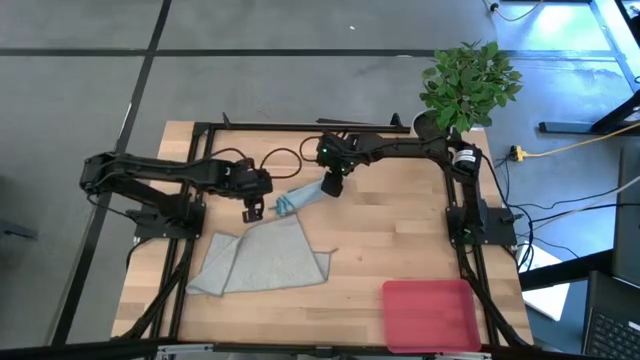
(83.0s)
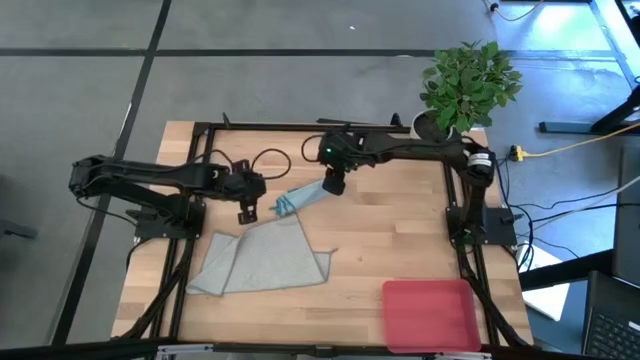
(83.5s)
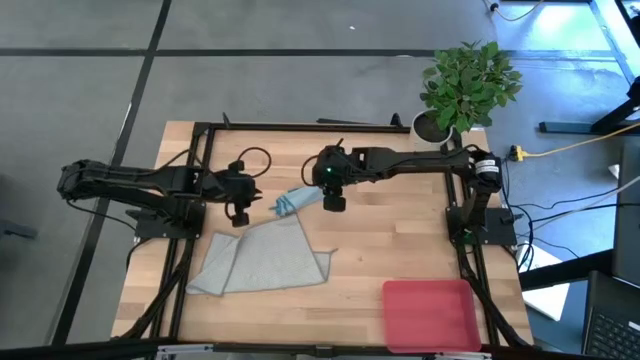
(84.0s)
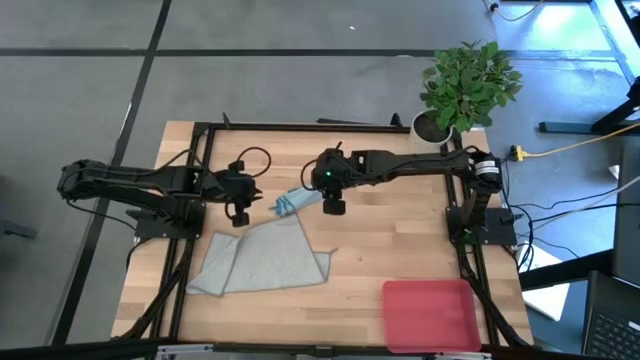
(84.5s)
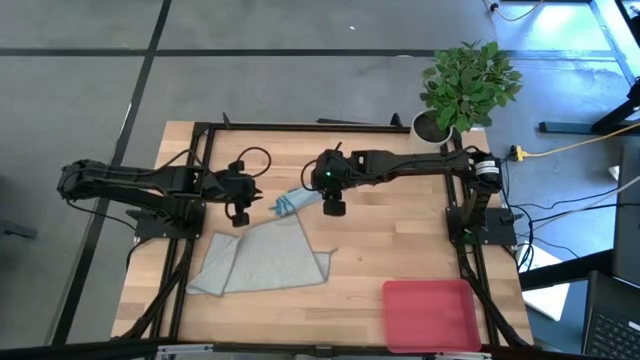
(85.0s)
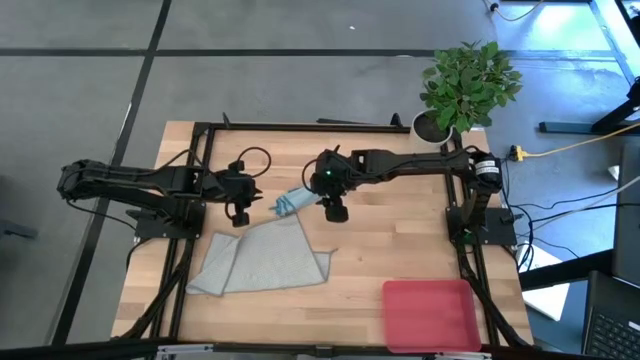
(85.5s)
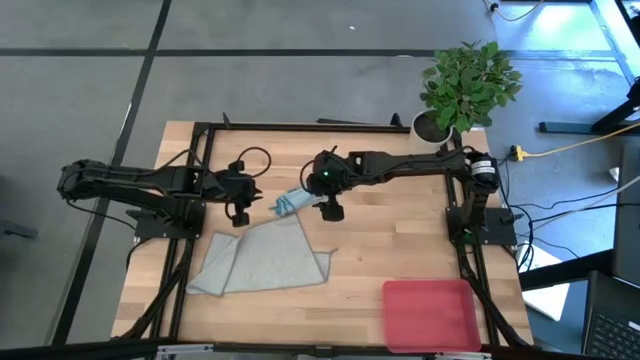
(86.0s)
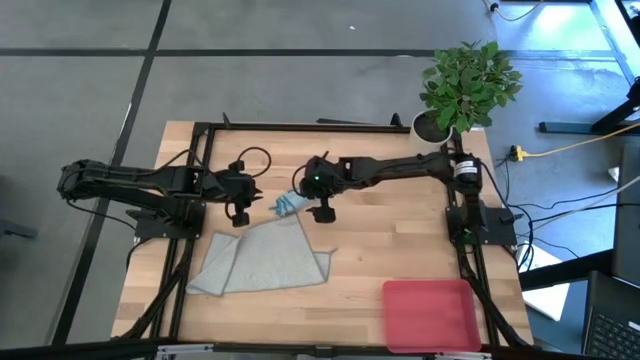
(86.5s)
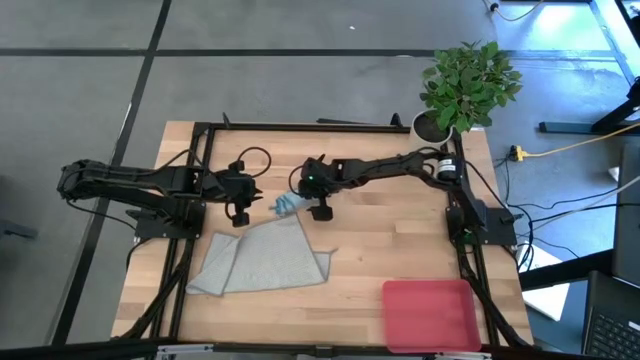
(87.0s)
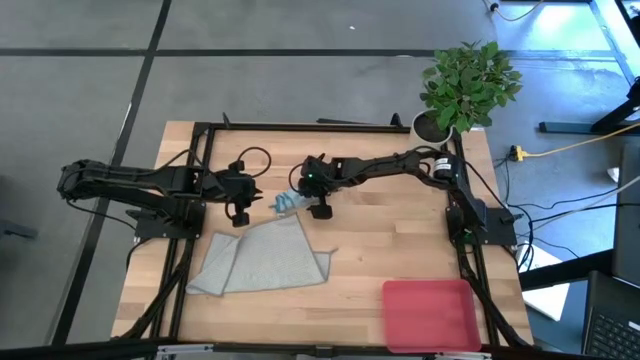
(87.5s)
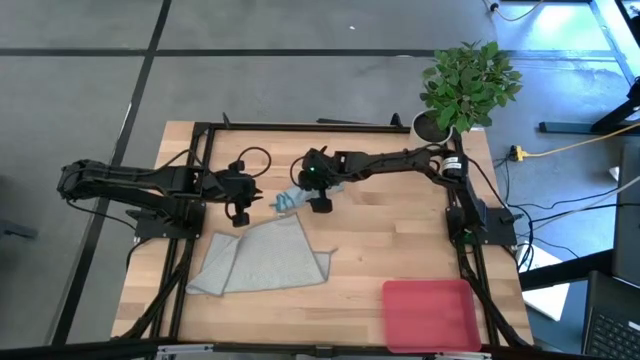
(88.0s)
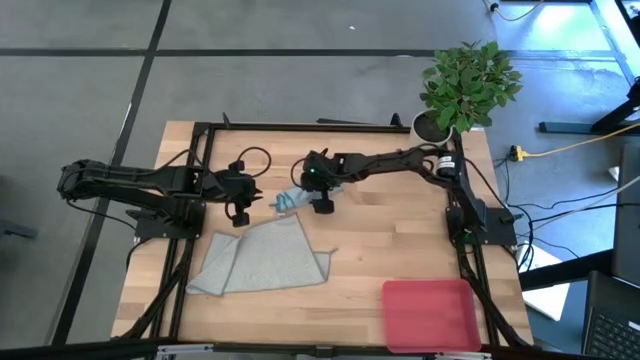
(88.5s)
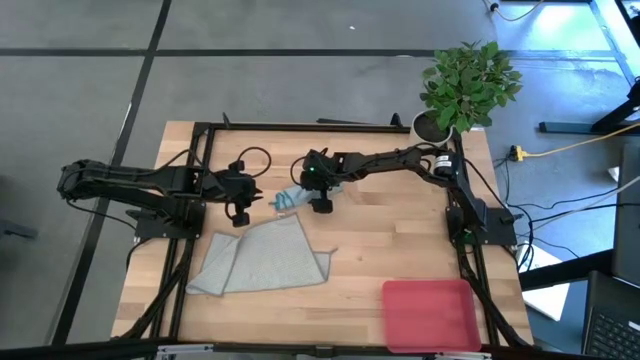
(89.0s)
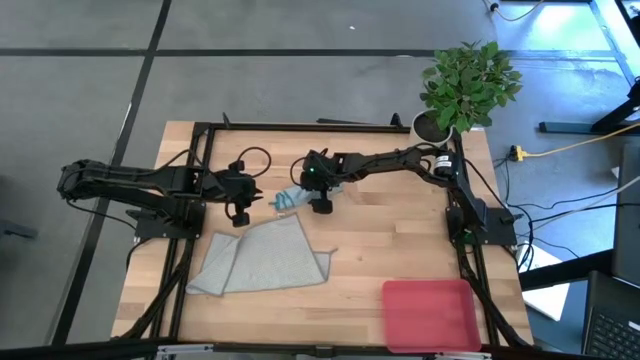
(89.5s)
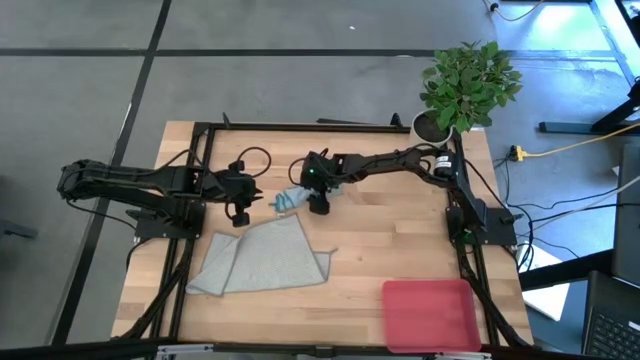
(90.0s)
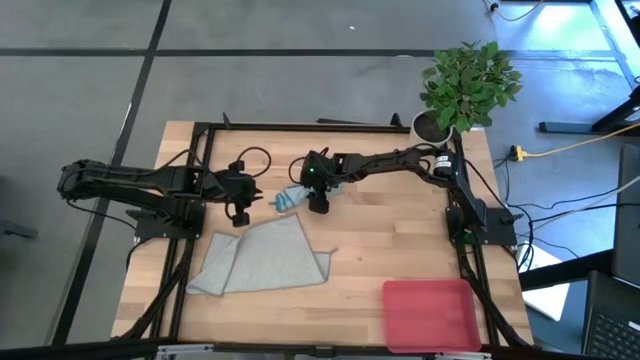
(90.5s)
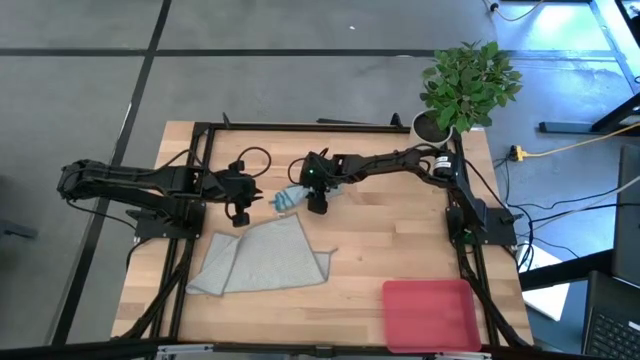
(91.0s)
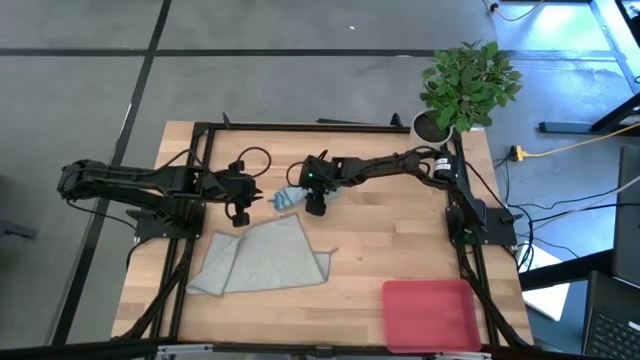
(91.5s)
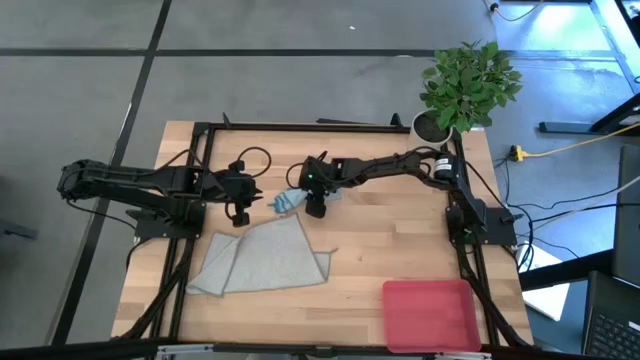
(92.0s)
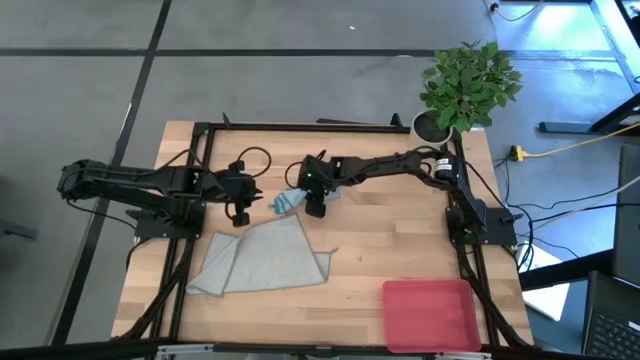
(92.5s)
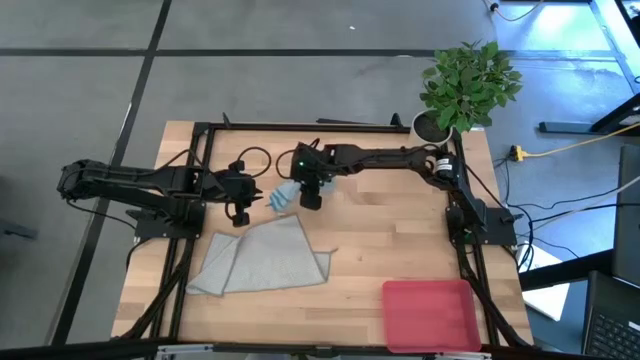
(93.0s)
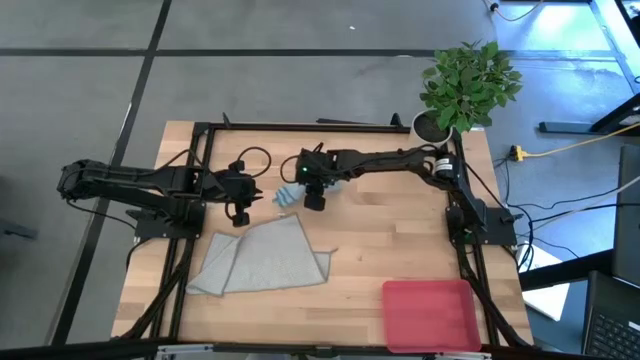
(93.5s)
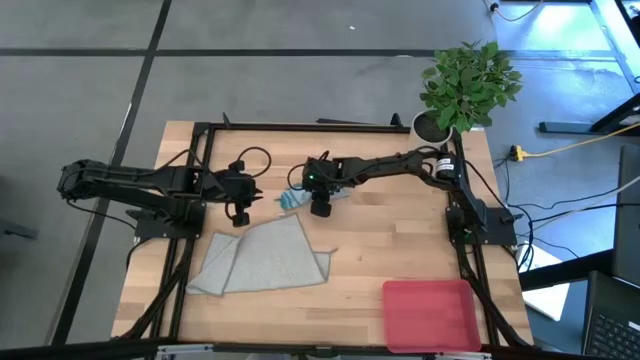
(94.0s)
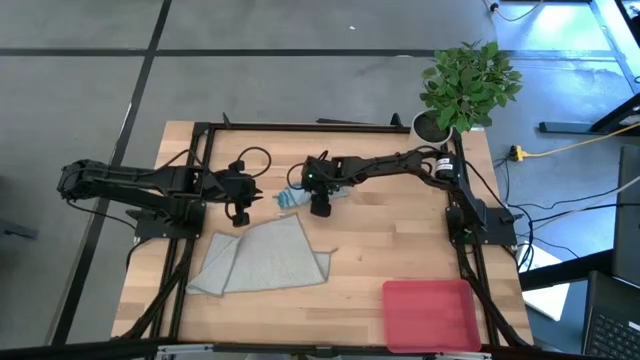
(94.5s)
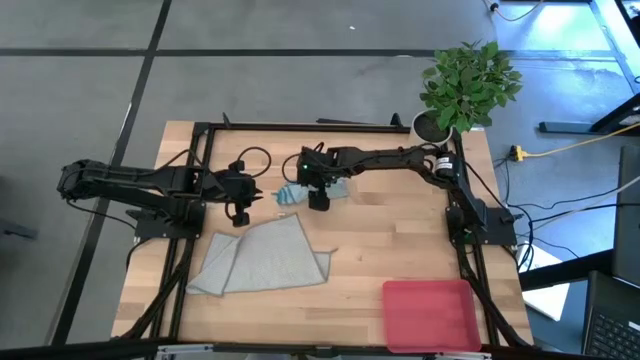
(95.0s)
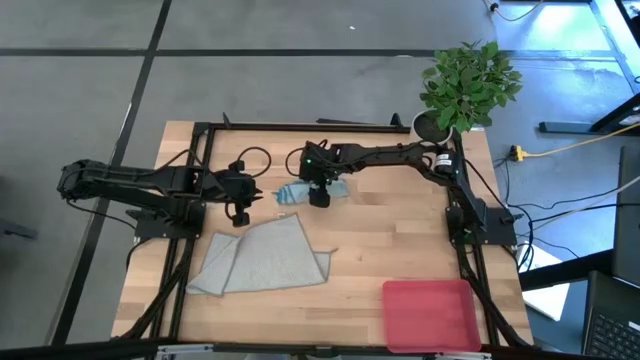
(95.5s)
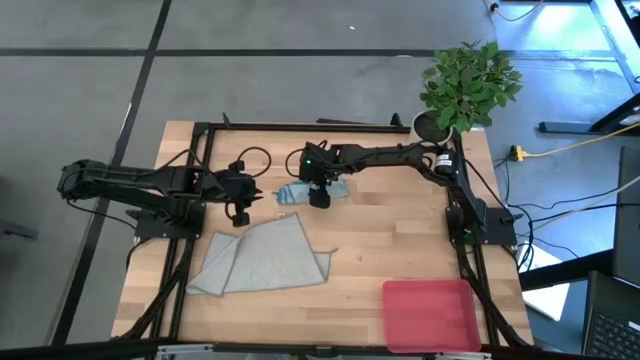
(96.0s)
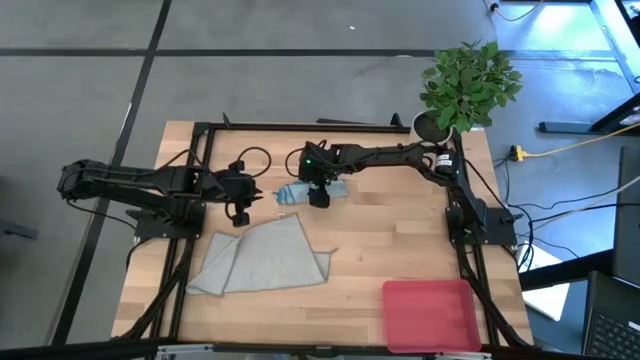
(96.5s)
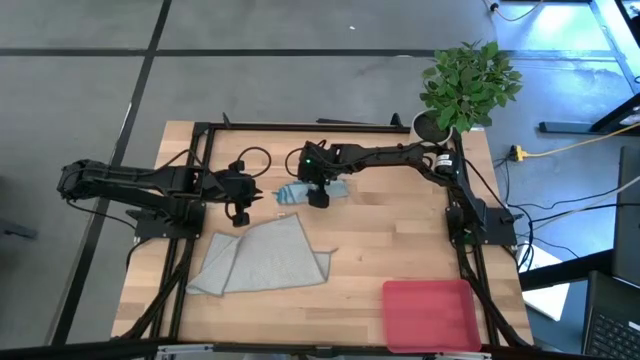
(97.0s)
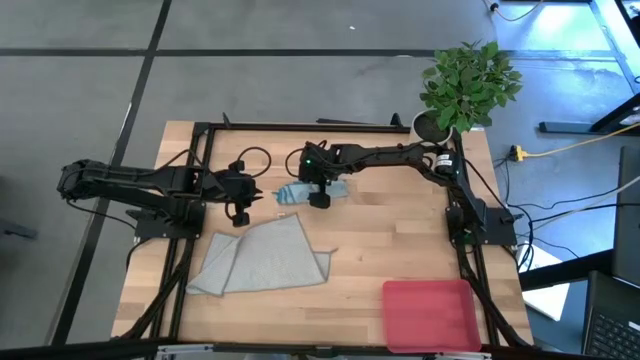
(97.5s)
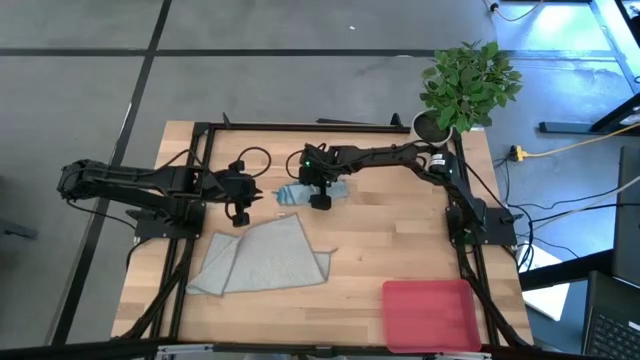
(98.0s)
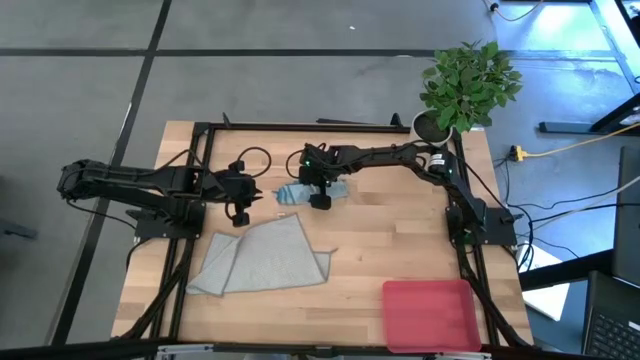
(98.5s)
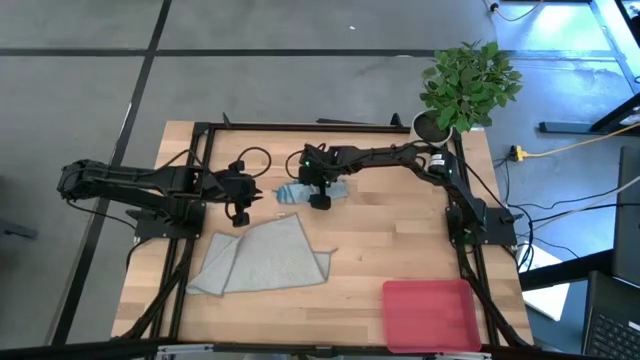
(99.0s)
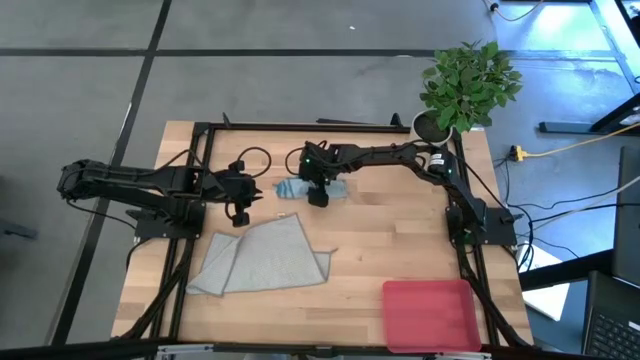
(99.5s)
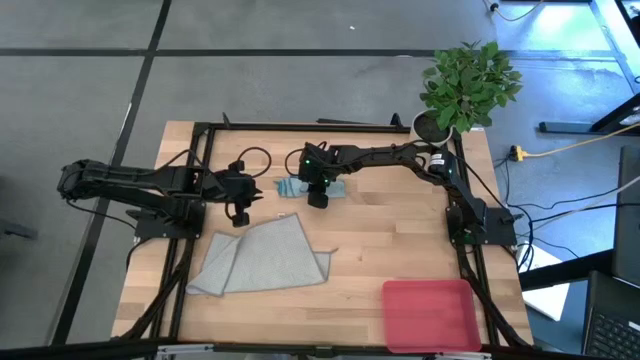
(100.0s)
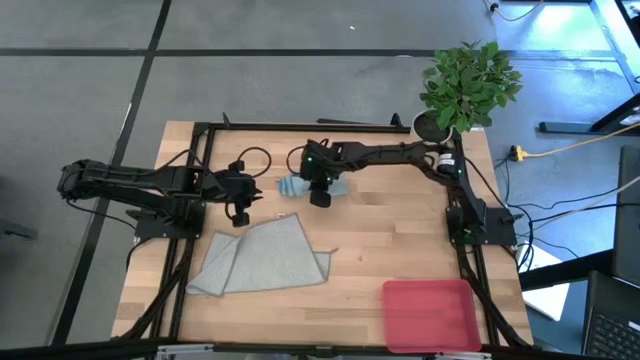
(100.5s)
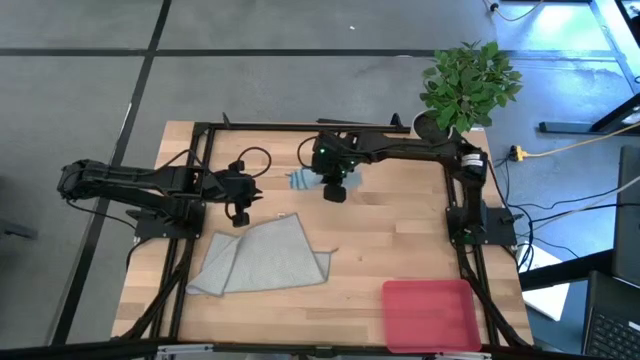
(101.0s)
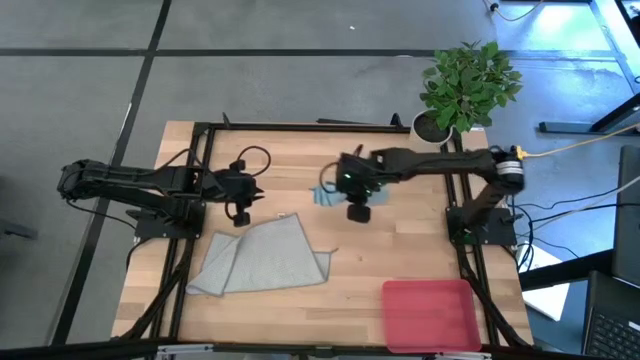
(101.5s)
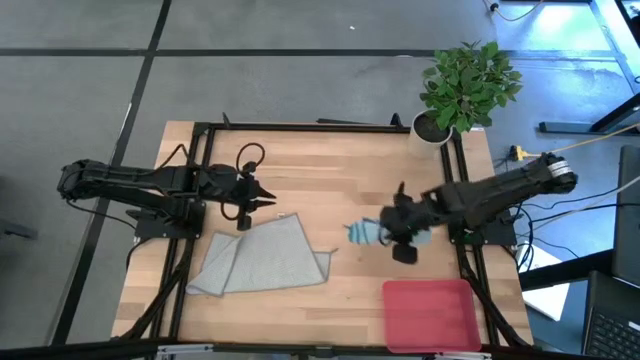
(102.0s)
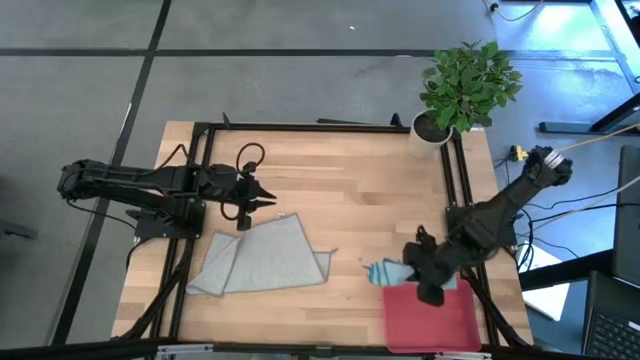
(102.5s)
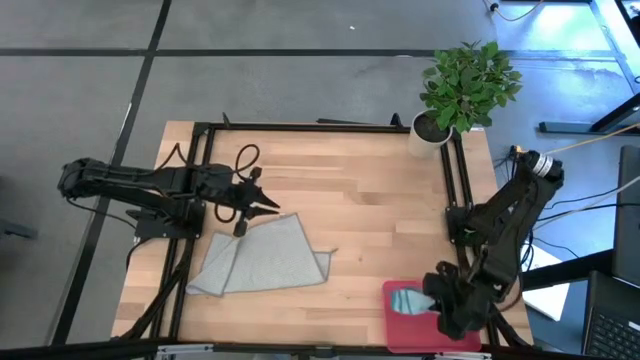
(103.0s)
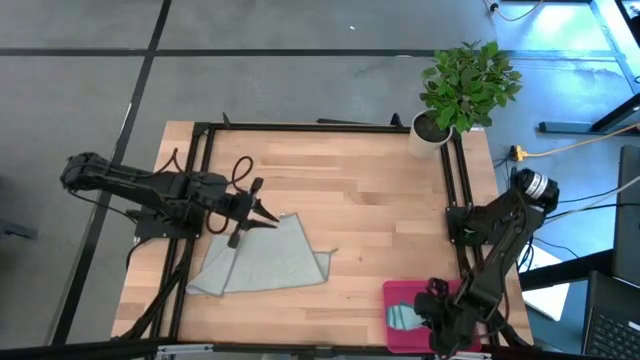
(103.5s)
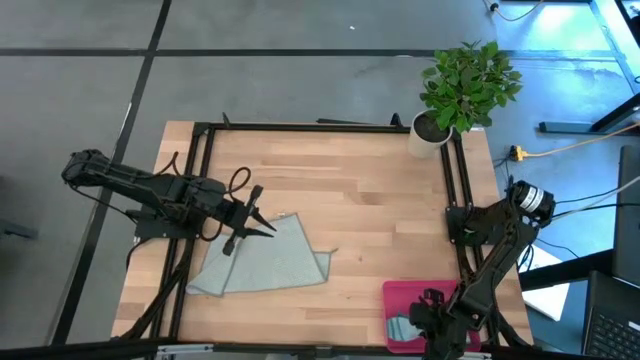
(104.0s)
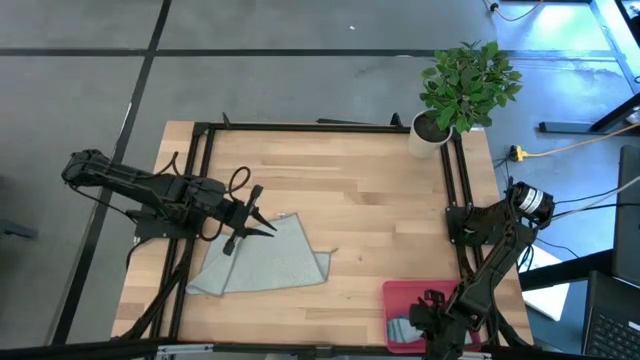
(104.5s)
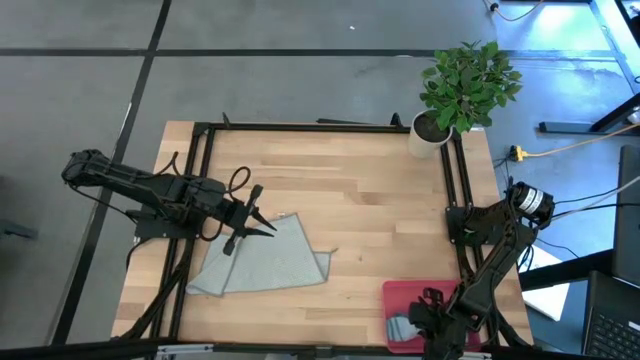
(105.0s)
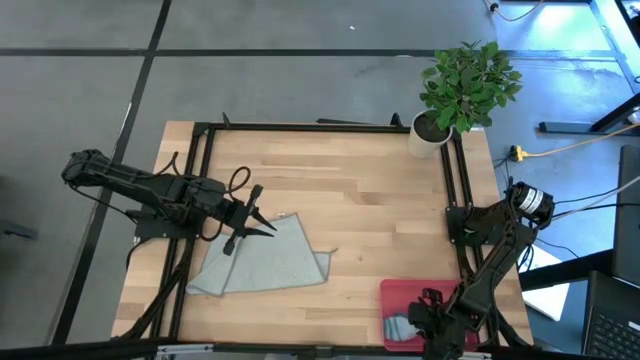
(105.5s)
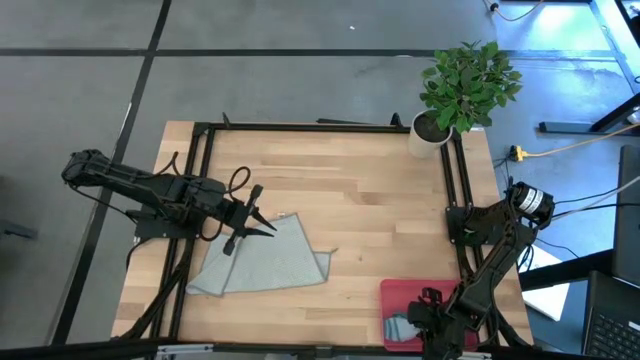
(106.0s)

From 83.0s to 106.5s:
Task: Roll microfiber towels into tight, uniform cylinder then place into a basket
Put the rolled blue towel into the red bin
